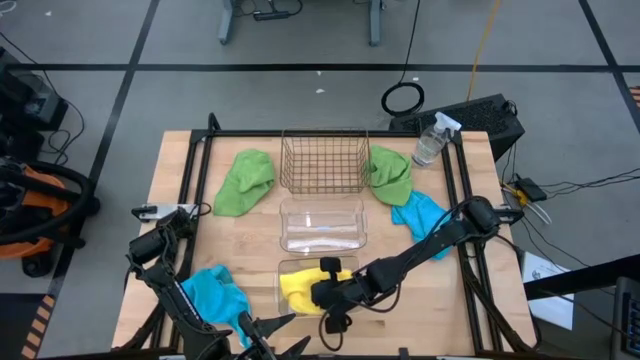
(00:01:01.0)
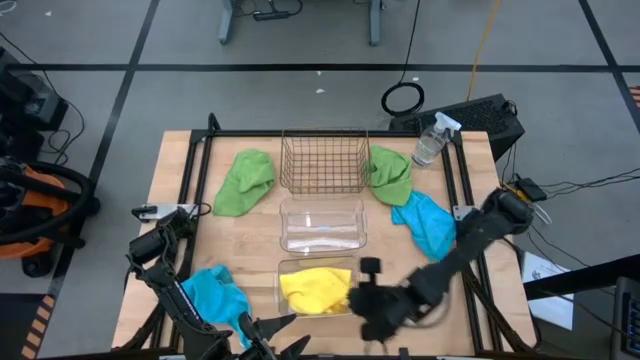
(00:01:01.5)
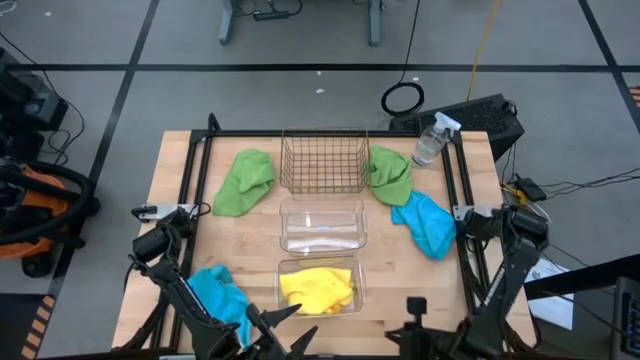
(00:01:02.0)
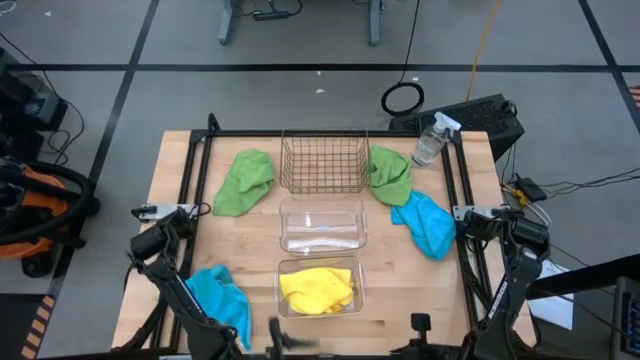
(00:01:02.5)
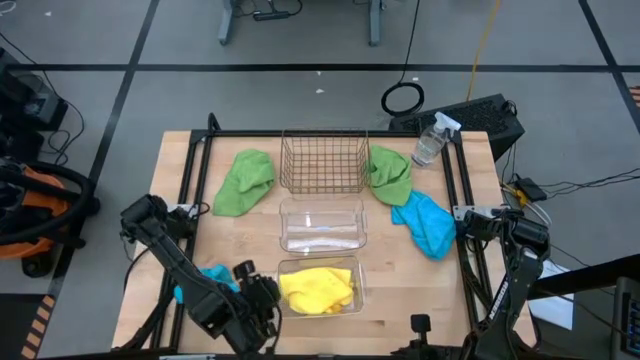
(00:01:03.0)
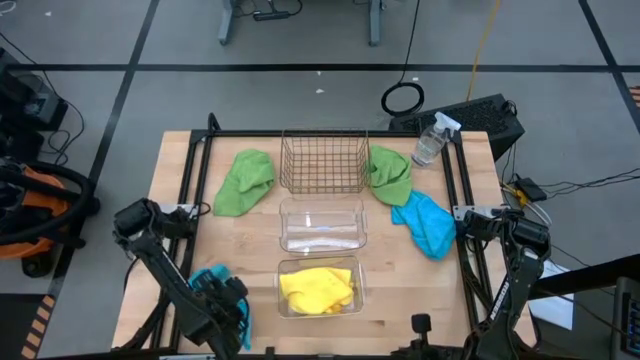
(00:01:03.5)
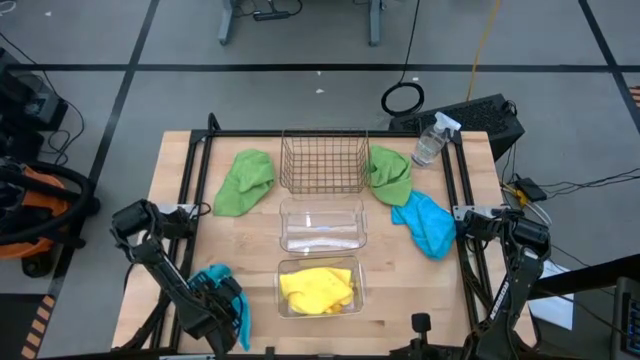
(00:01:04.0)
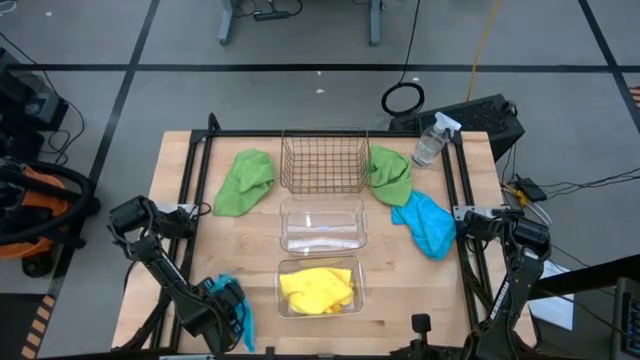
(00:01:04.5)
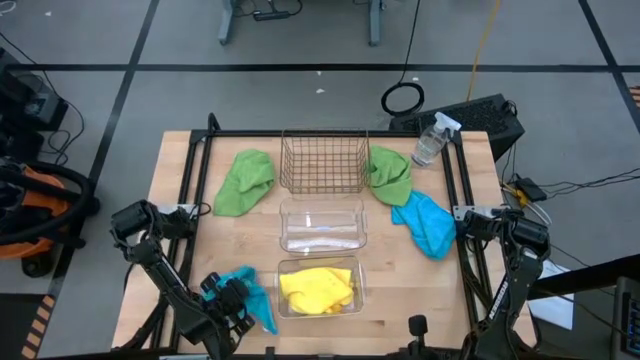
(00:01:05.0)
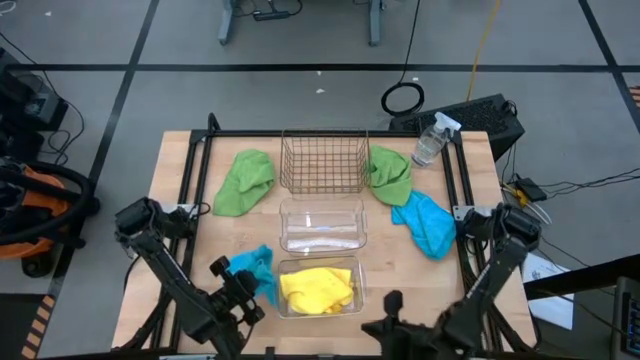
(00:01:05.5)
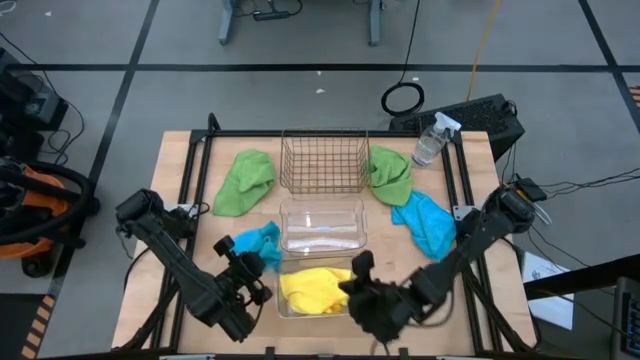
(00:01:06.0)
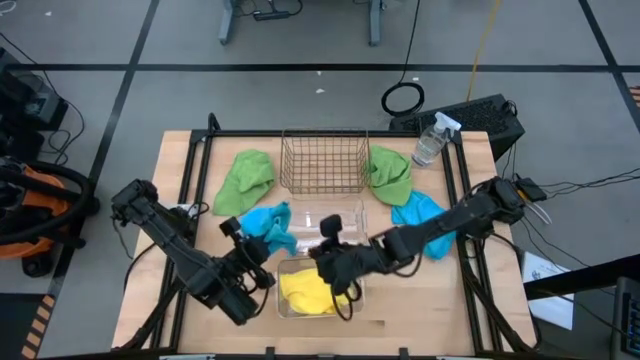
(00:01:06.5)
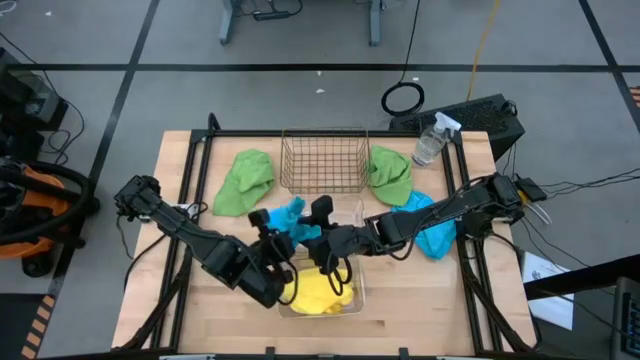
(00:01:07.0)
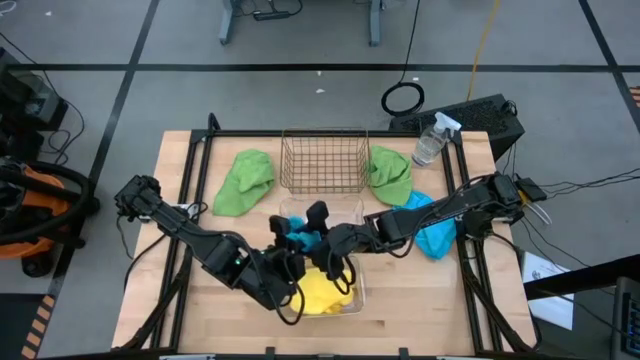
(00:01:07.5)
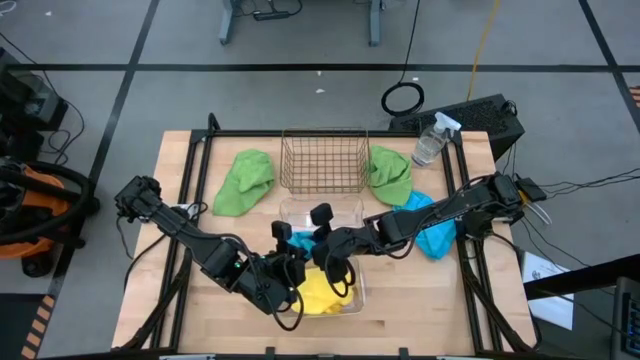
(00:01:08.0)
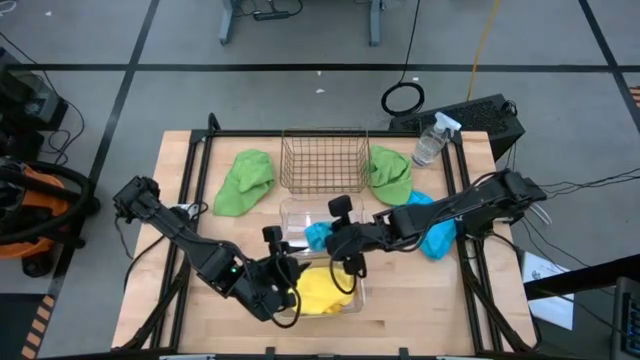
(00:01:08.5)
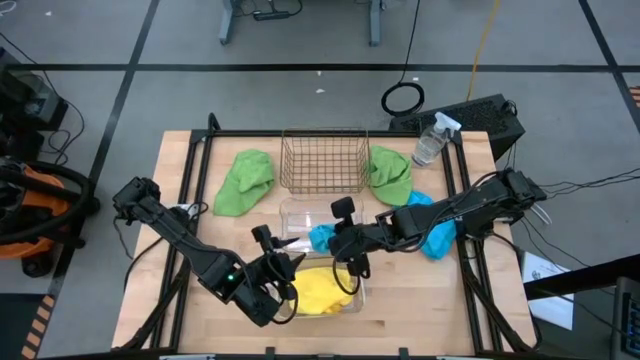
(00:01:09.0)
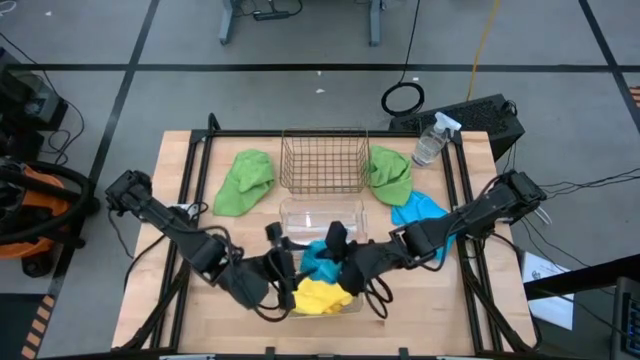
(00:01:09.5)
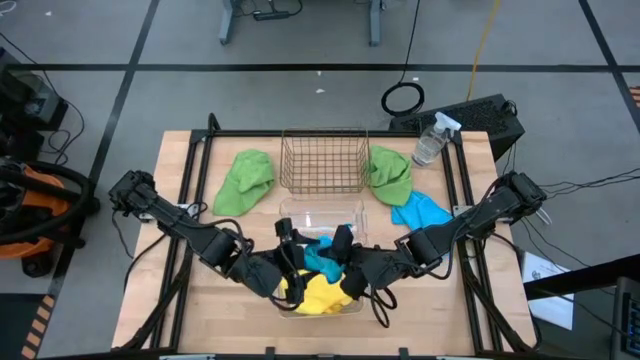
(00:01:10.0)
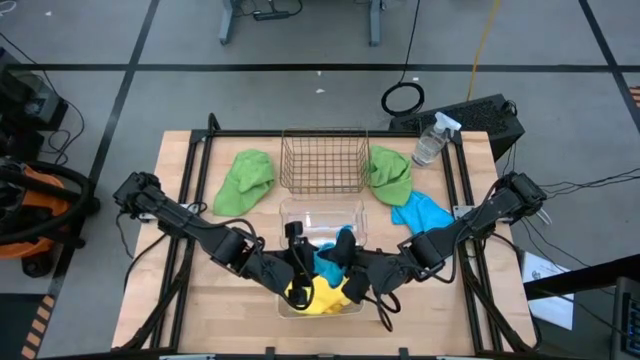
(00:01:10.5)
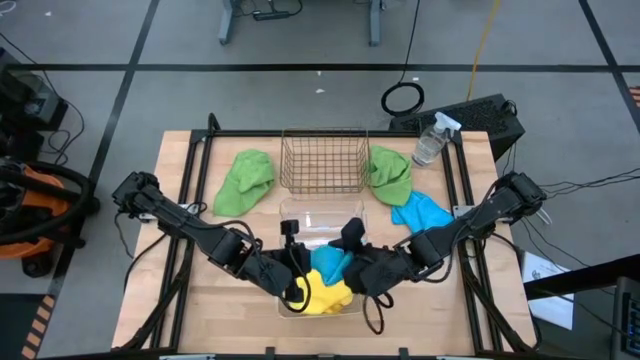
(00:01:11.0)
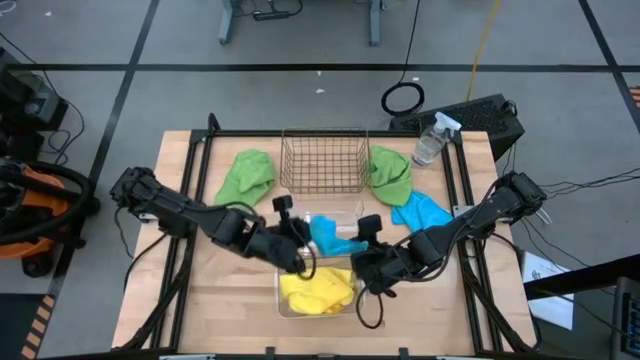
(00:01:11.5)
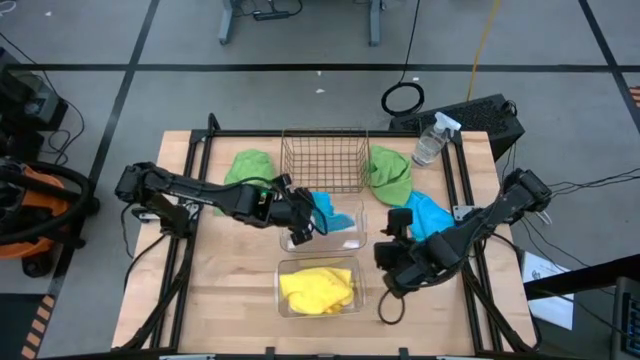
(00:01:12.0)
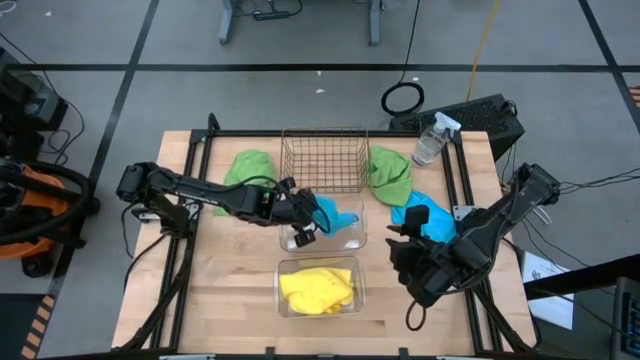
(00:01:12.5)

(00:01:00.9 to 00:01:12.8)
Task: Sort microfiber towel by color & place in baskets
Put the bottom blue towel into the top transparent bin

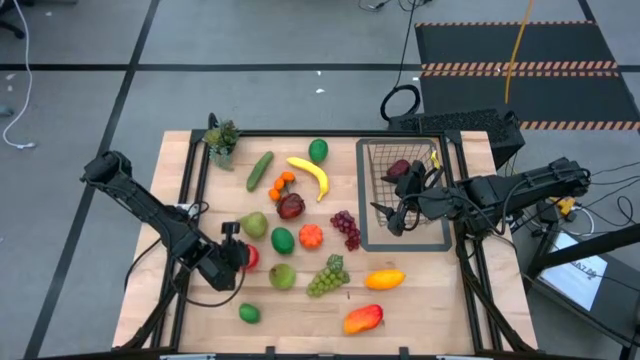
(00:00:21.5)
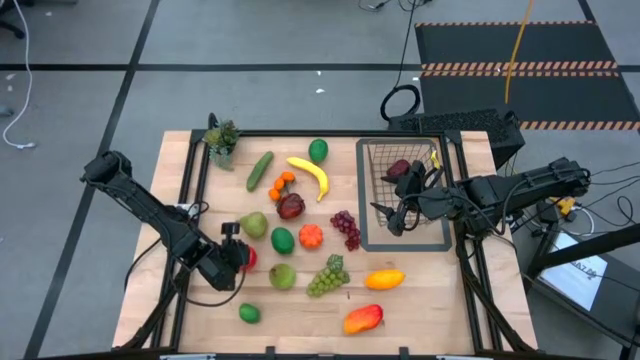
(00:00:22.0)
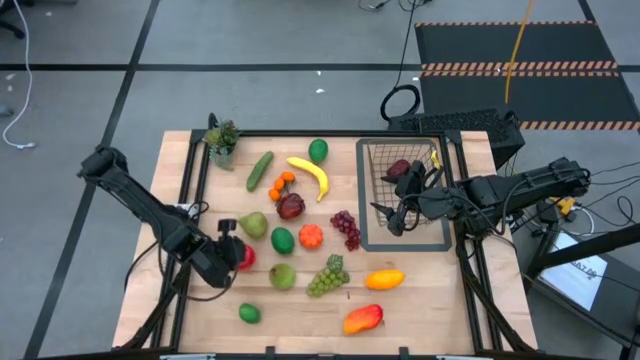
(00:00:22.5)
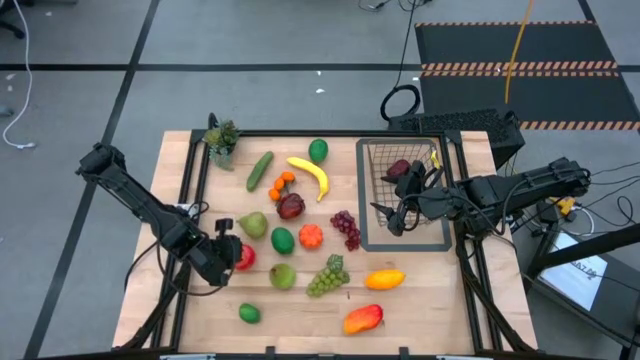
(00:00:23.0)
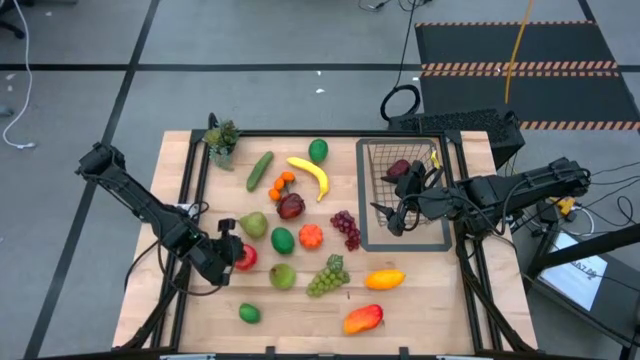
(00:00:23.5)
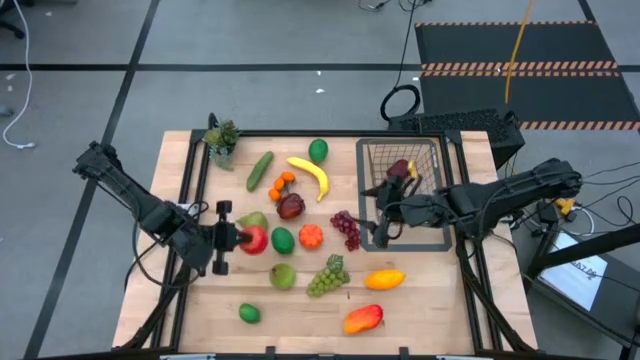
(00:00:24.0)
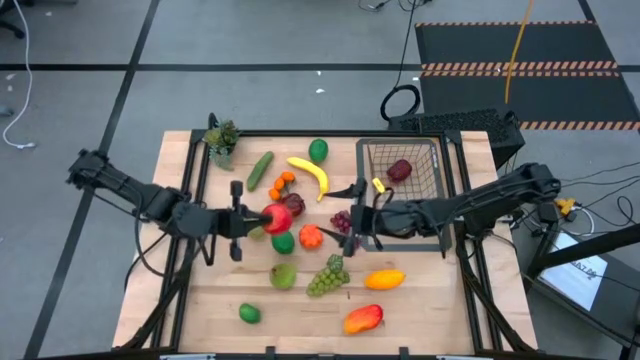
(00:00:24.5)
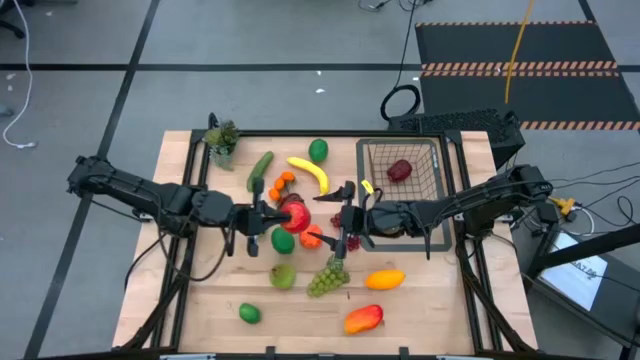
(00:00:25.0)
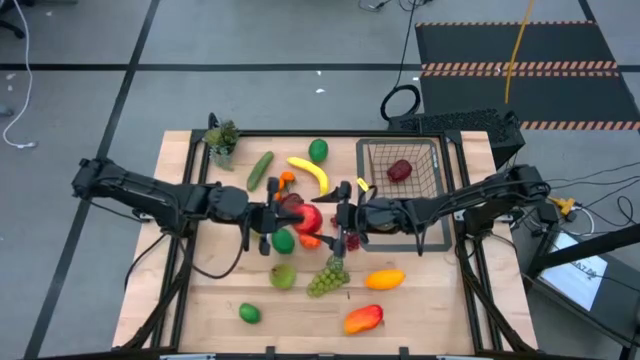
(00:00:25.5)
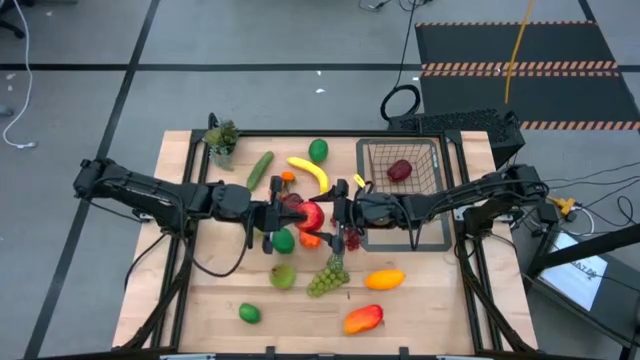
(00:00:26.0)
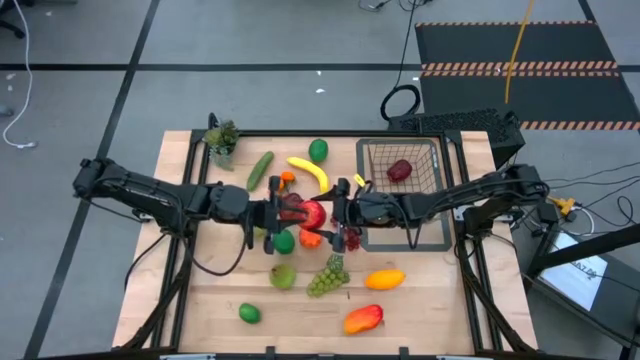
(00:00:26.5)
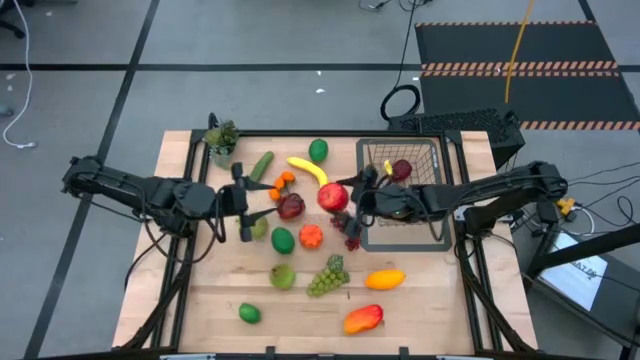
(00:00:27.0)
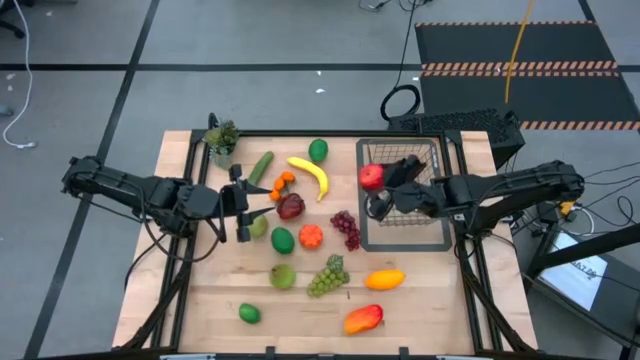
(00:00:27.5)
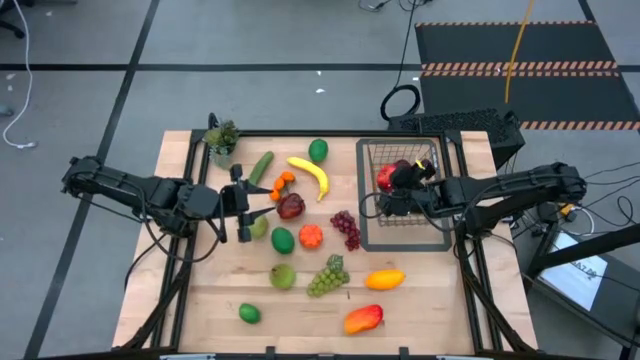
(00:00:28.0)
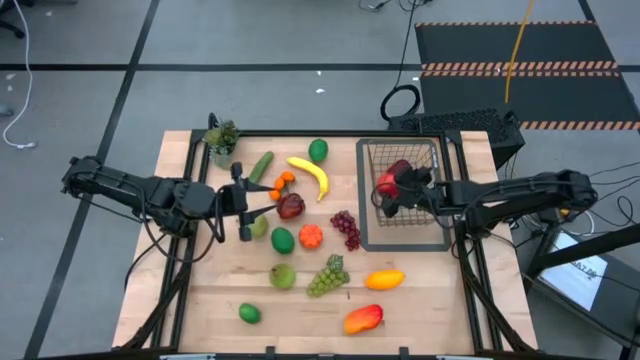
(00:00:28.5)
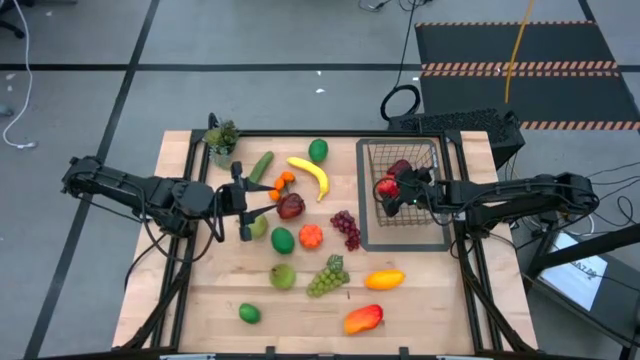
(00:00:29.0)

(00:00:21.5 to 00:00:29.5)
Task: Build produce basket
Put the bottom apple into the gold wire basket
